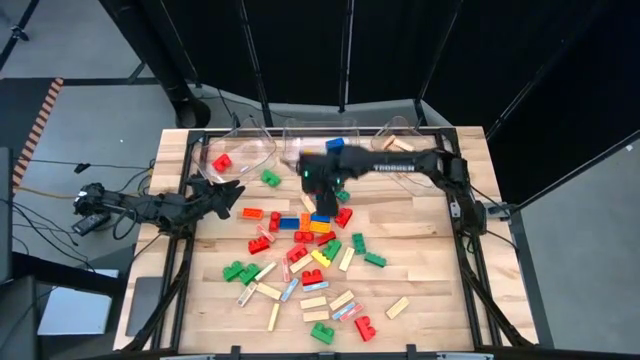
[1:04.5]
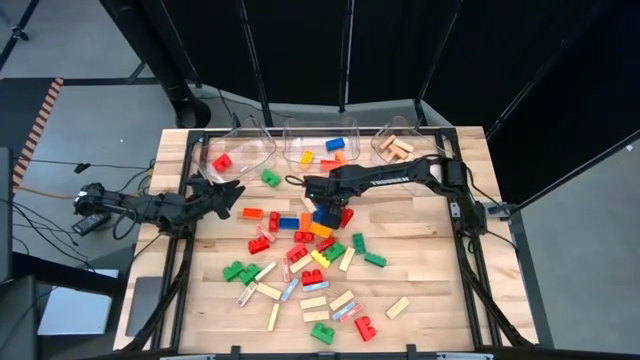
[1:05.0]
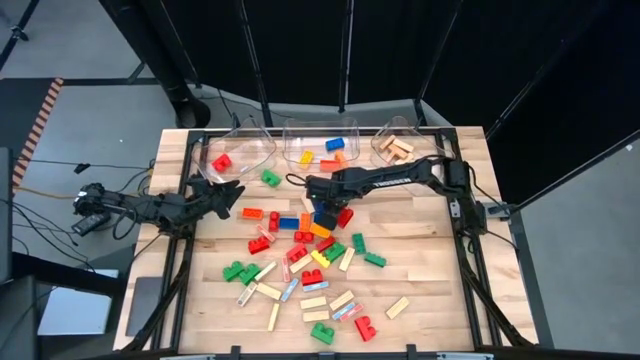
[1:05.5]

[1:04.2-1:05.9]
Task: Sort blocks by size
Put the large orange game piece into the middle transparent bin

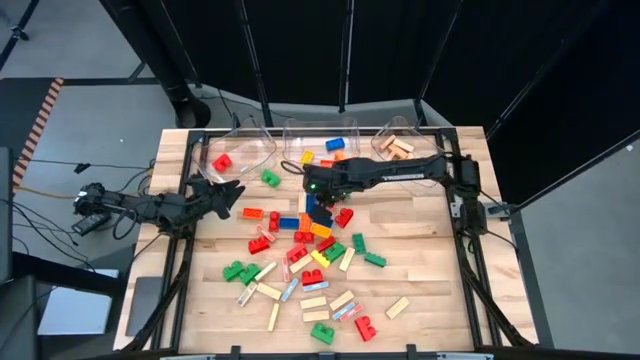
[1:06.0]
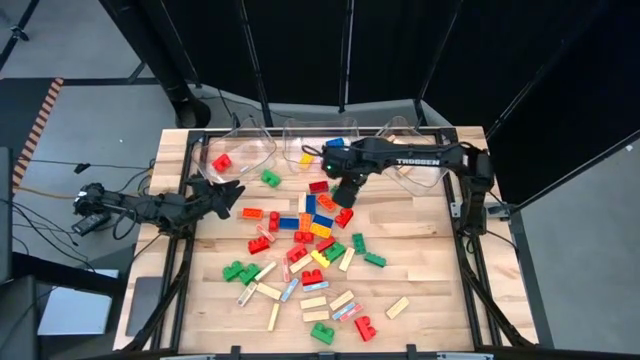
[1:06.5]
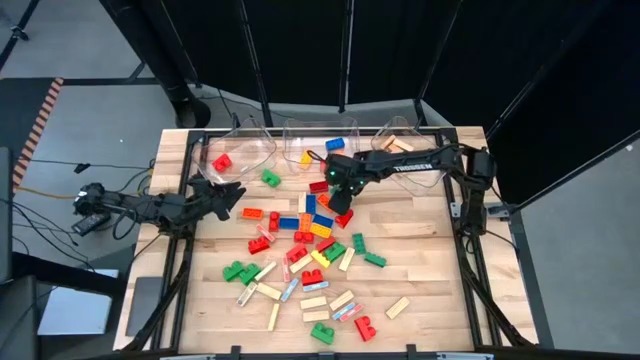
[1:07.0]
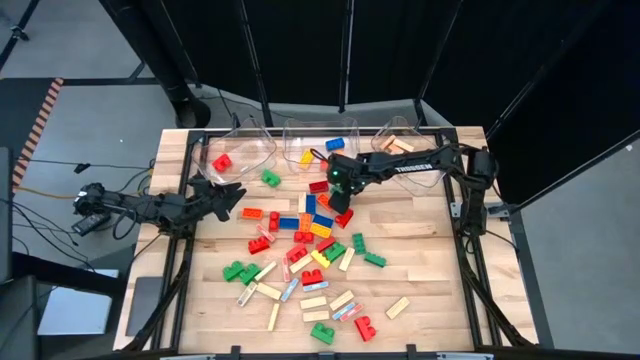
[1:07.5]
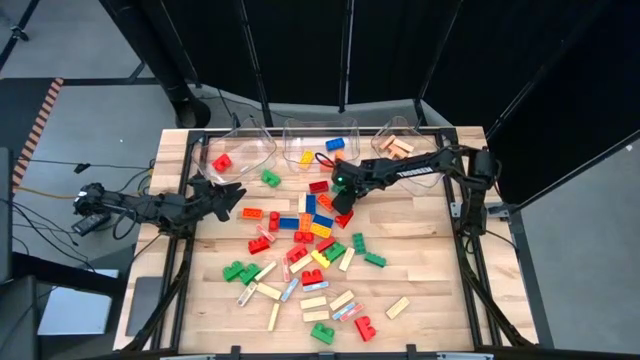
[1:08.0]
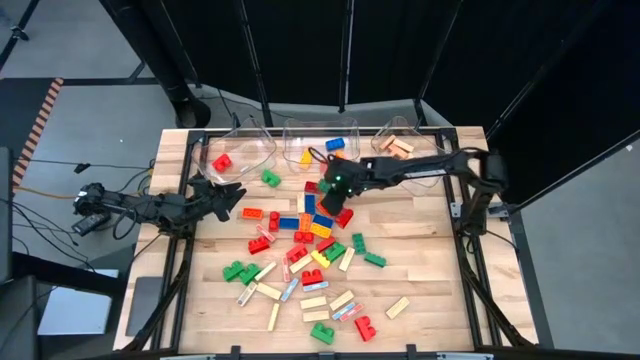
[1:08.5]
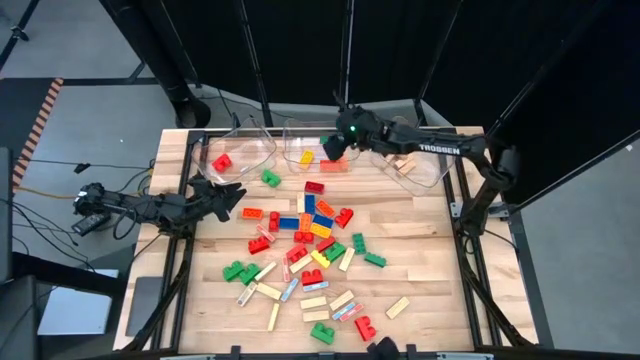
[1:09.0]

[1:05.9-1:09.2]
Put the large green game piece into the middle transparent bin

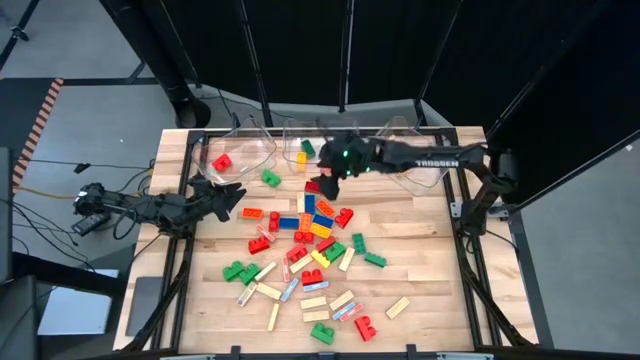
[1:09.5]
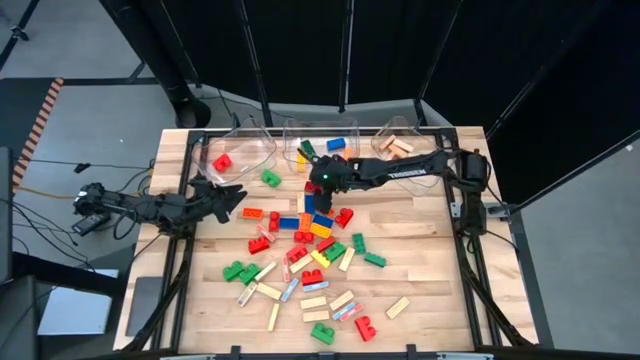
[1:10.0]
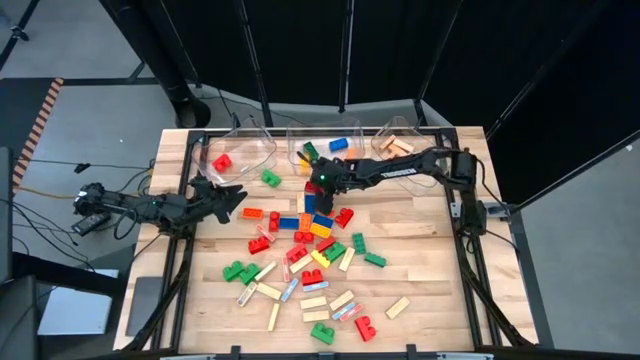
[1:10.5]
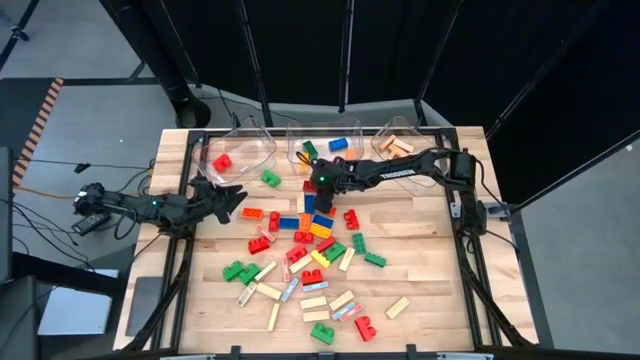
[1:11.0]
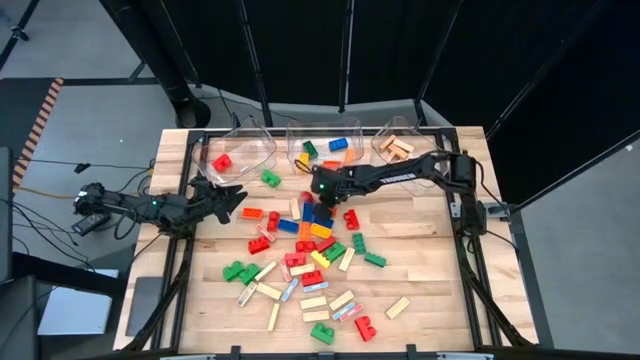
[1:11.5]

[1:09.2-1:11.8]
Put the large red game piece into the middle transparent bin

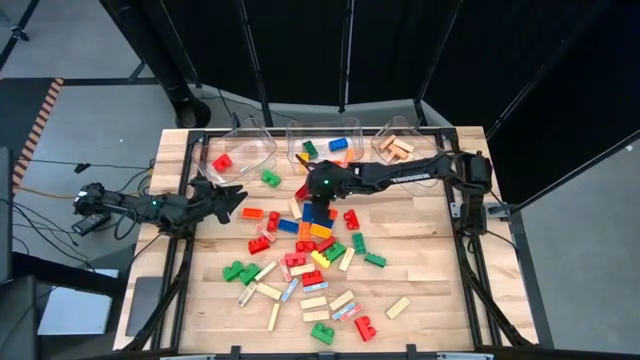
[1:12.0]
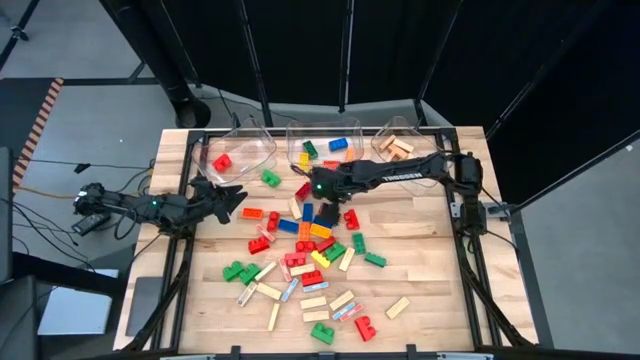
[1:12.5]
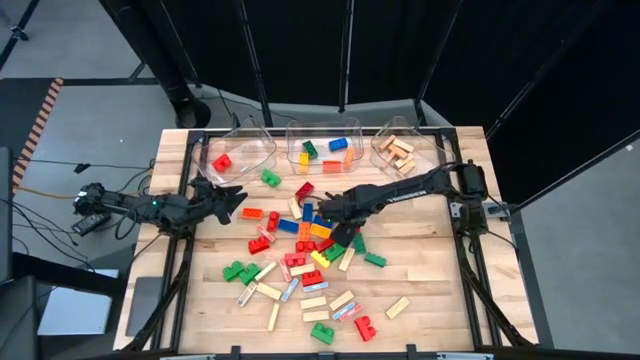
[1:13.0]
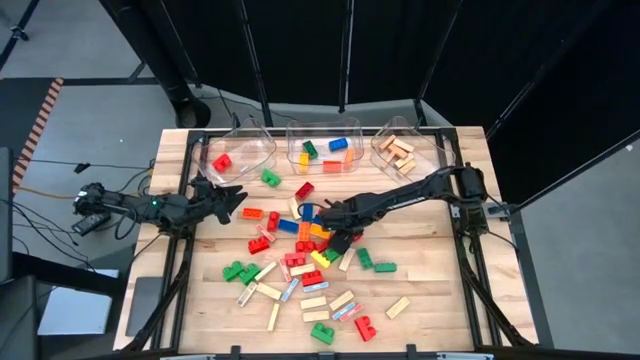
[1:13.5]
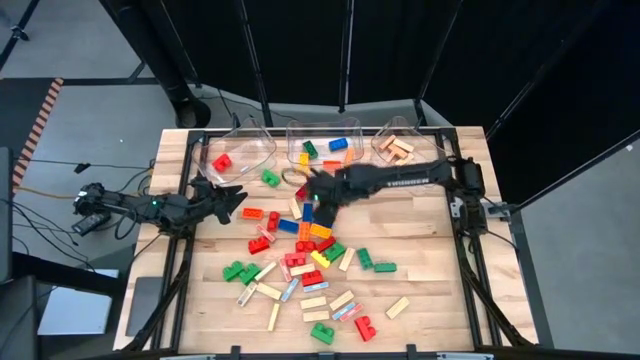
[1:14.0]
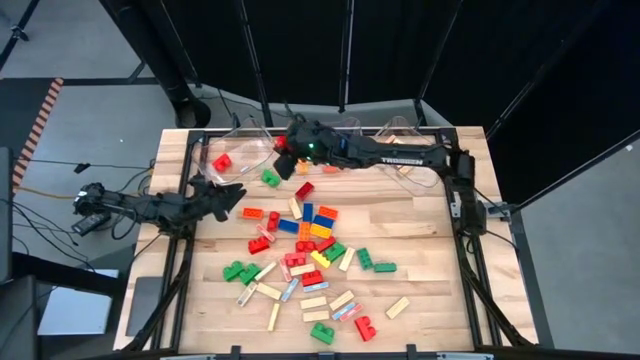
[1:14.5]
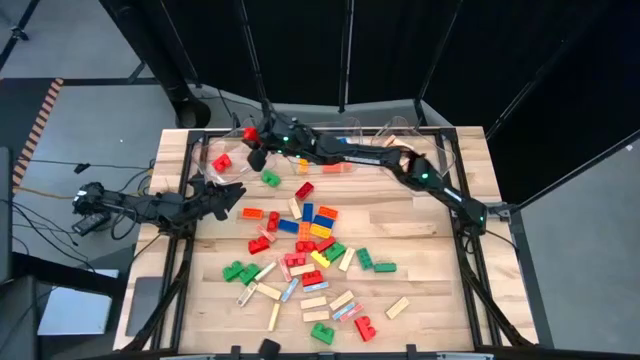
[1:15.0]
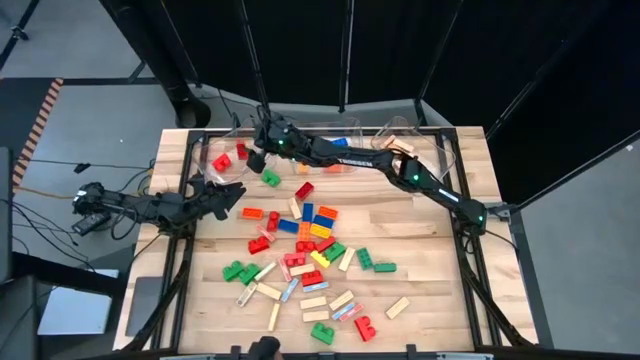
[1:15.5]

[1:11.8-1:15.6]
Put the small red game piece into the left transparent bin

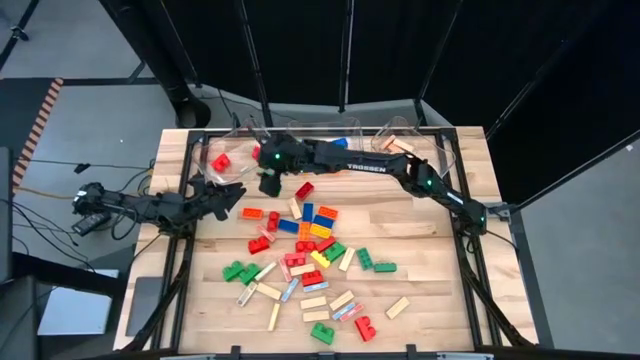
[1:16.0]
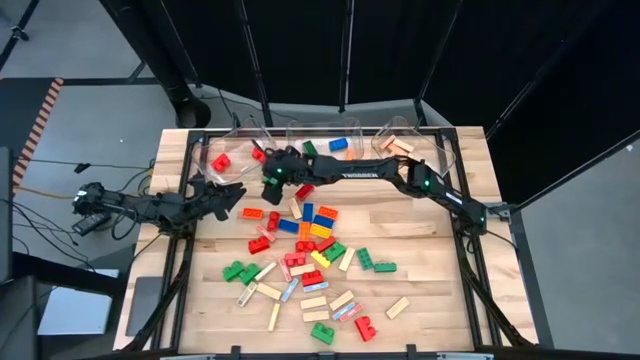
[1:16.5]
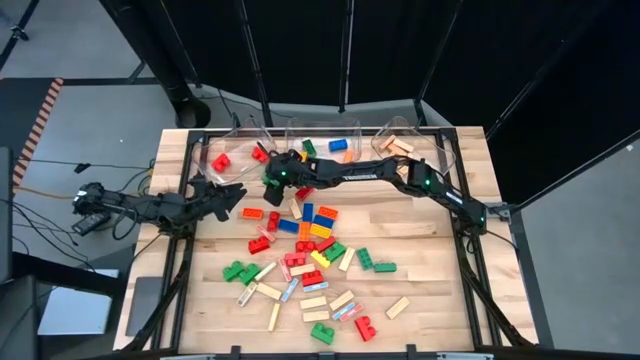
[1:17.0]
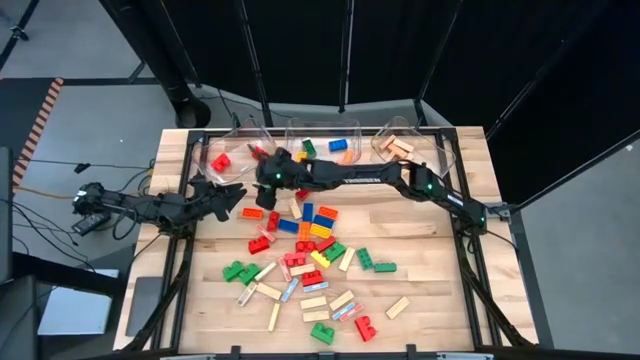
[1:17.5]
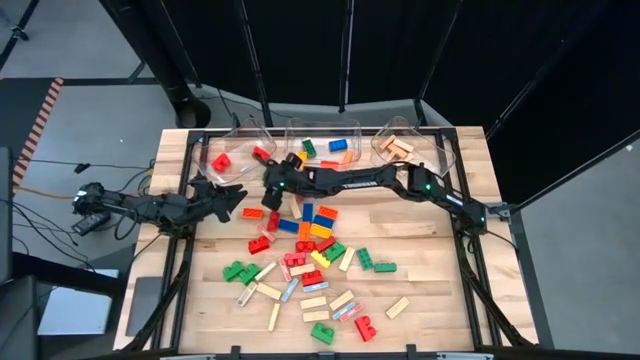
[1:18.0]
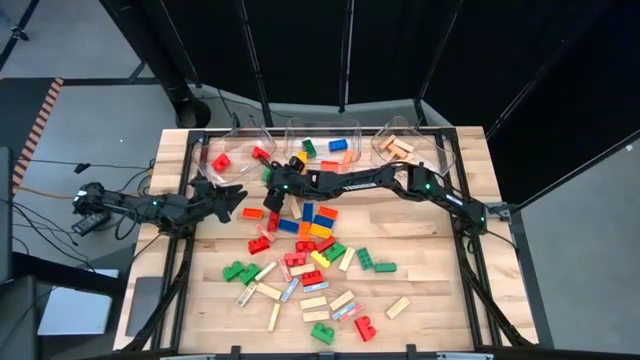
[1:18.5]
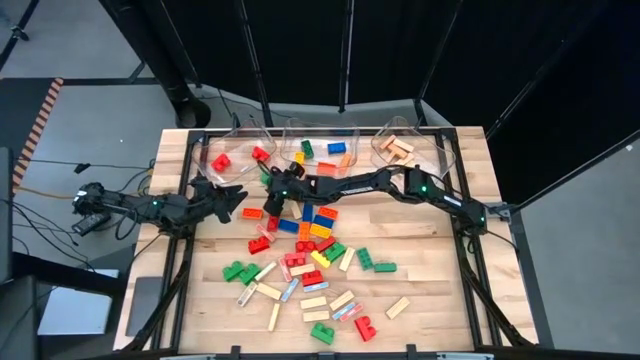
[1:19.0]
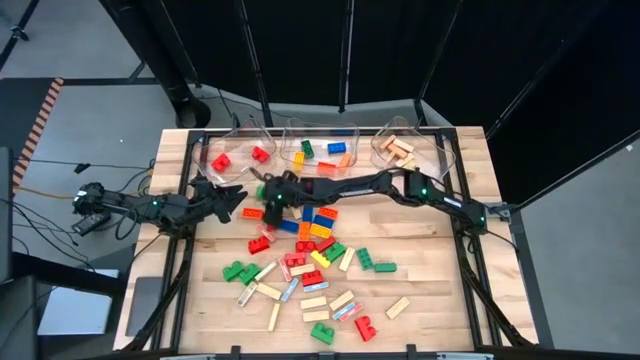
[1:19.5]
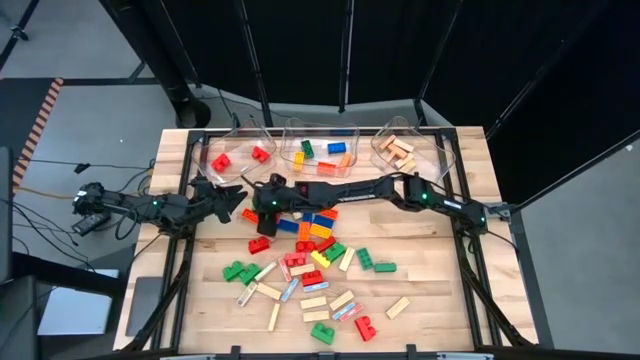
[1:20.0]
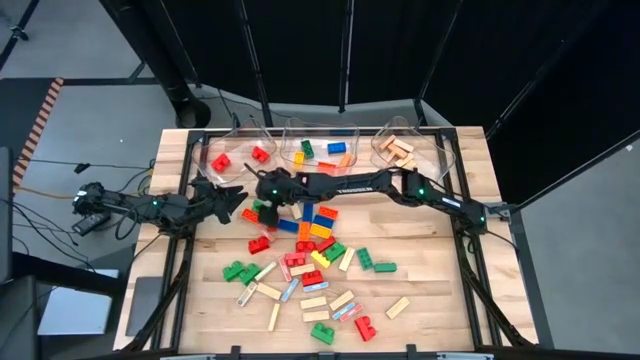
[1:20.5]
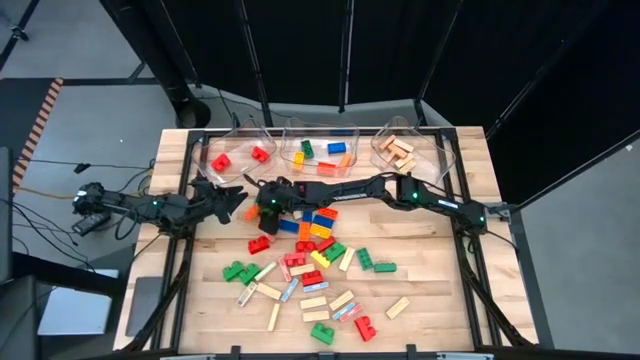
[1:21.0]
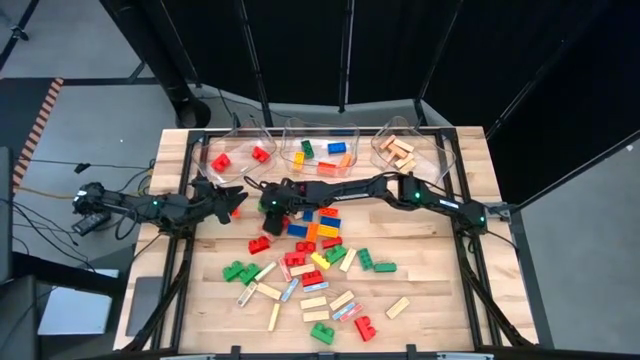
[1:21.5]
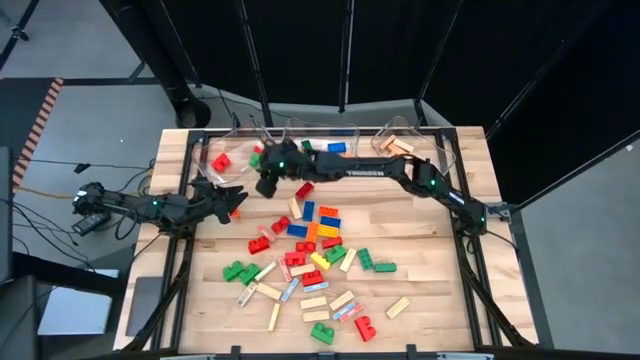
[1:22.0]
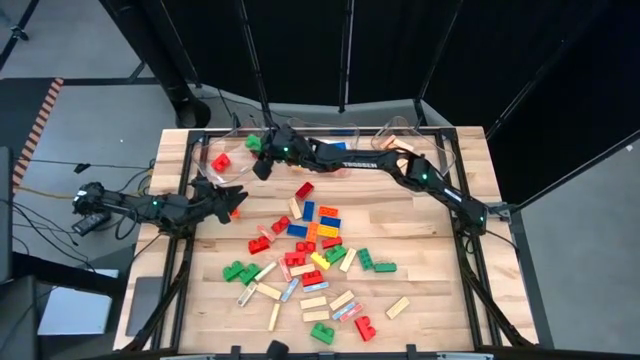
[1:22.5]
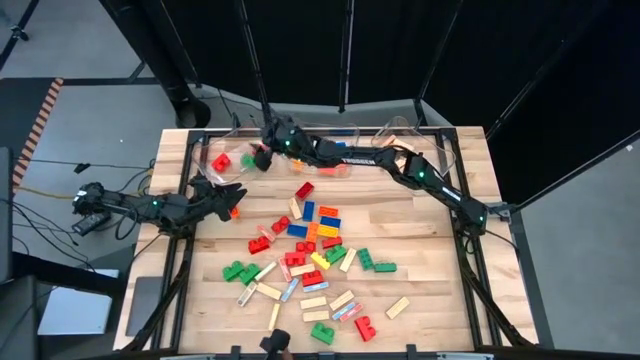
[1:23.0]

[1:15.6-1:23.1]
Put the small green game piece into the left transparent bin

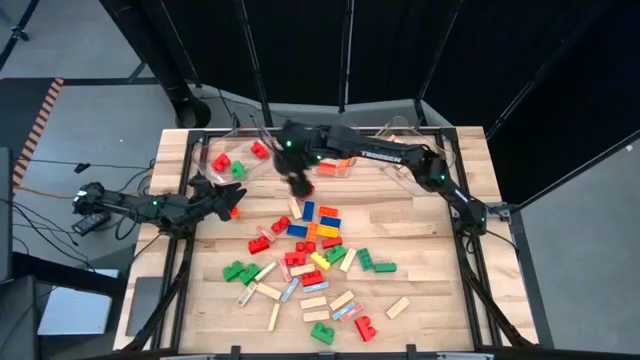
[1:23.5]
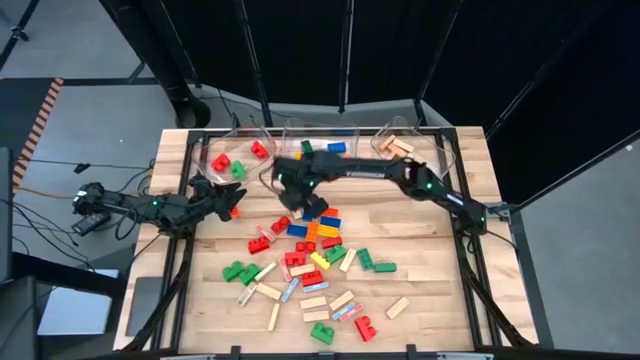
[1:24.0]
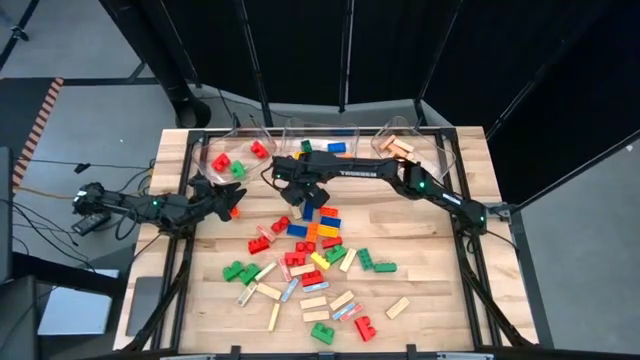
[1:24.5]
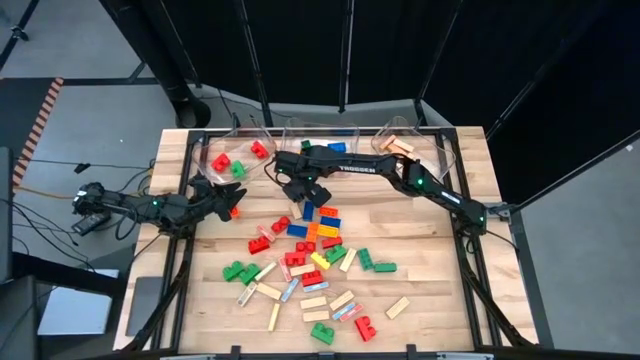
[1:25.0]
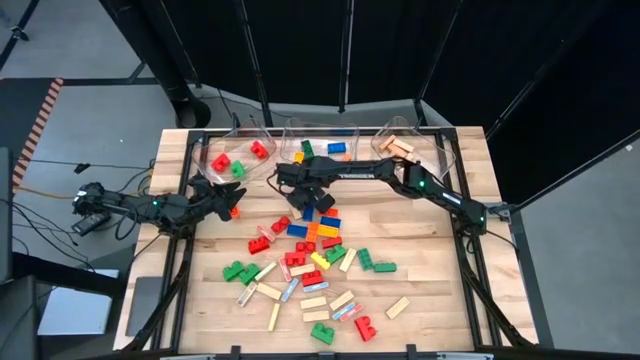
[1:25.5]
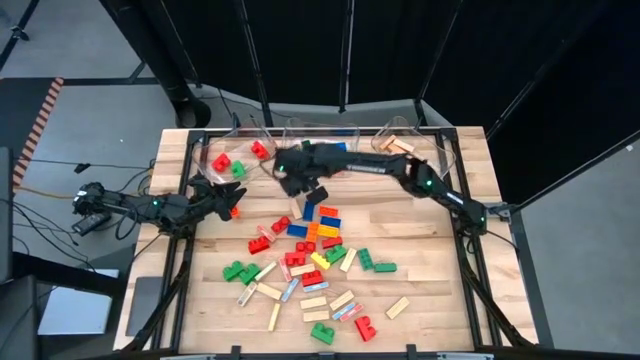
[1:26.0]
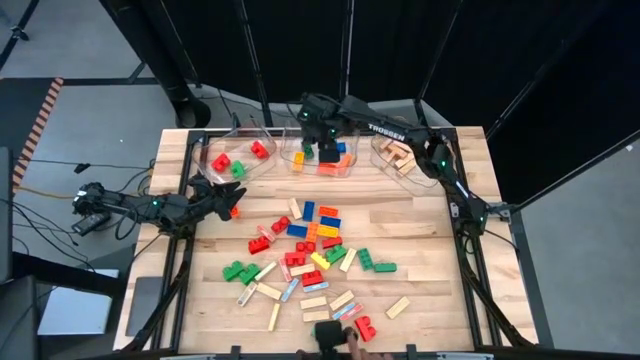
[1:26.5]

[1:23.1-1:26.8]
Put the large red game piece into the middle transparent bin

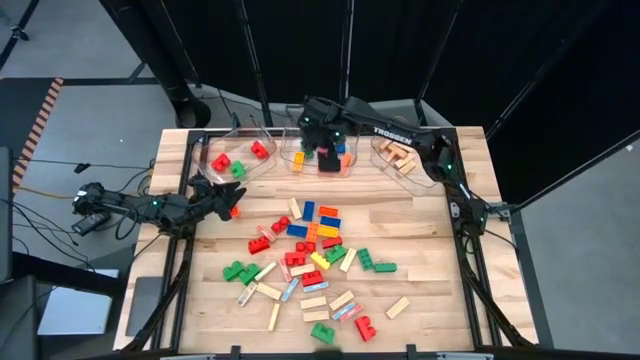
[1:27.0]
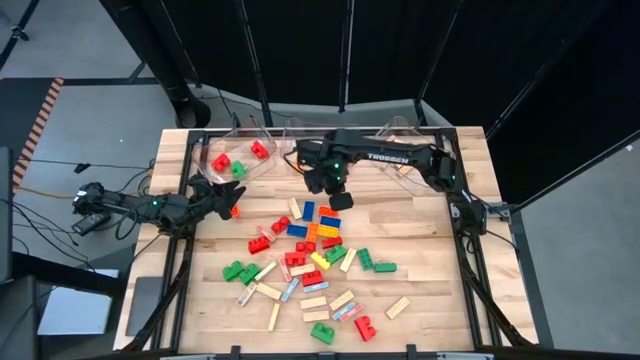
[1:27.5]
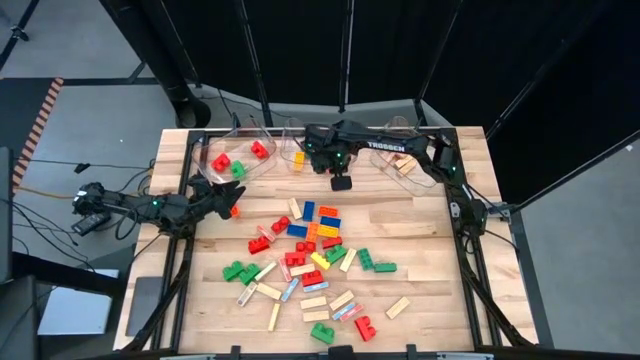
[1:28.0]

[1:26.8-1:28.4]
Adjust the middle transparent bin
